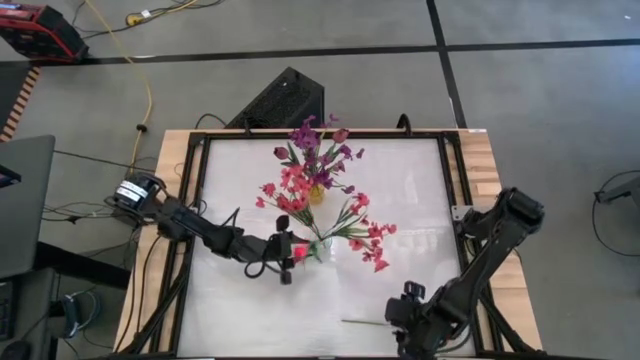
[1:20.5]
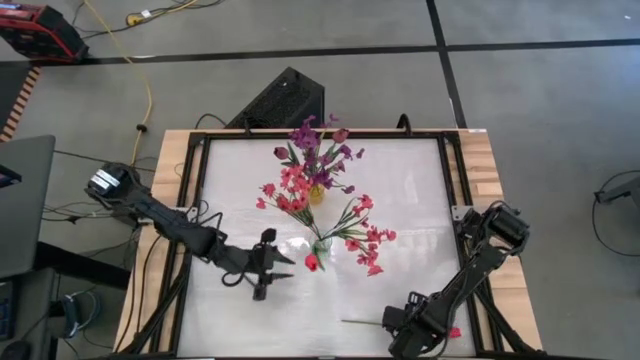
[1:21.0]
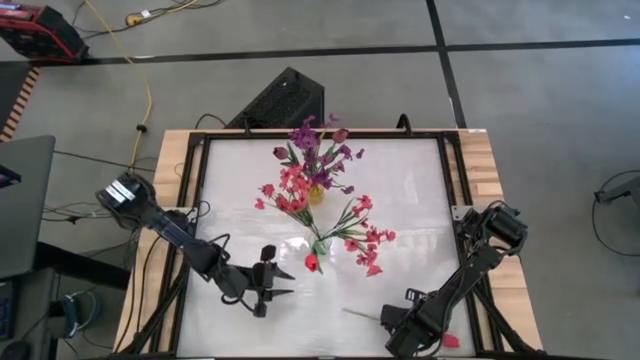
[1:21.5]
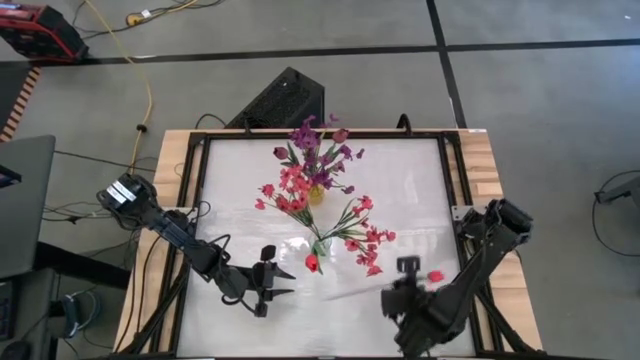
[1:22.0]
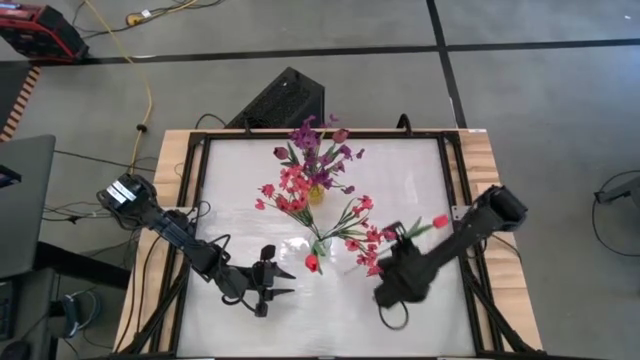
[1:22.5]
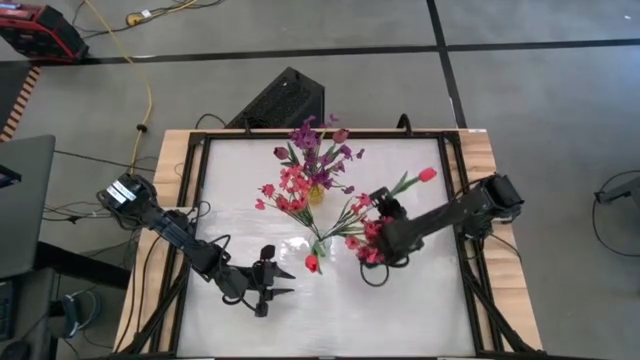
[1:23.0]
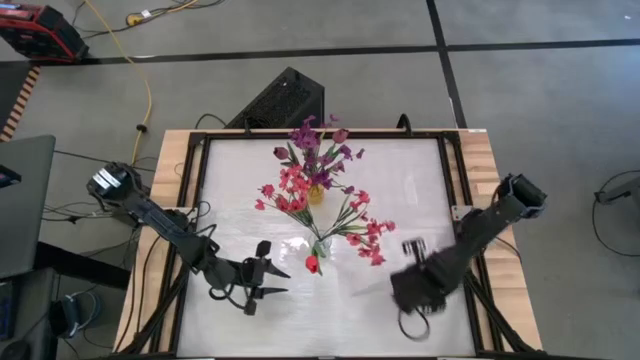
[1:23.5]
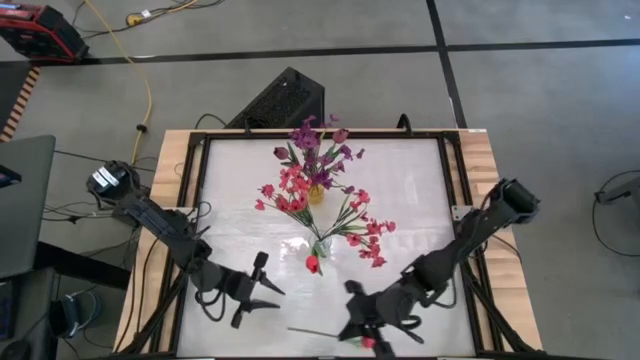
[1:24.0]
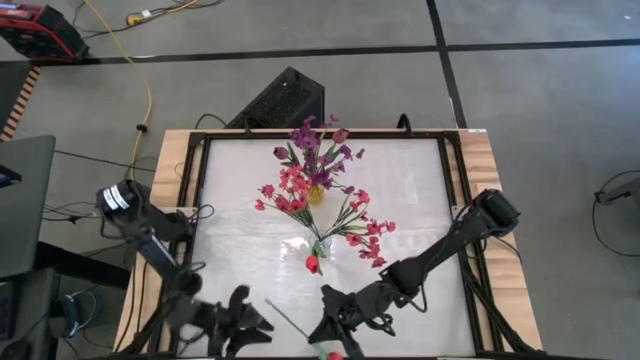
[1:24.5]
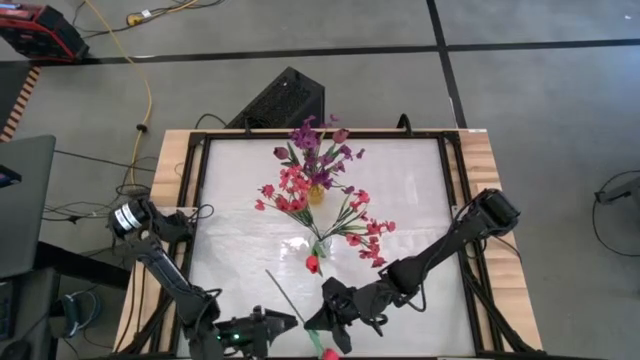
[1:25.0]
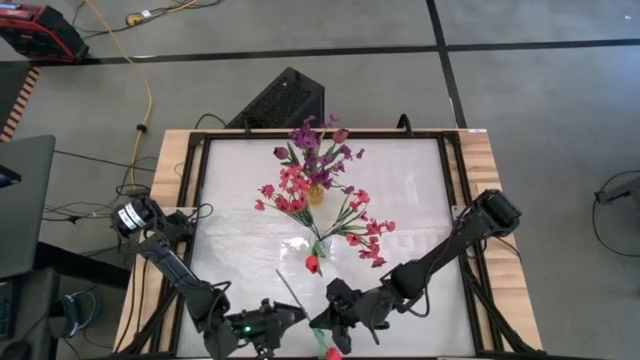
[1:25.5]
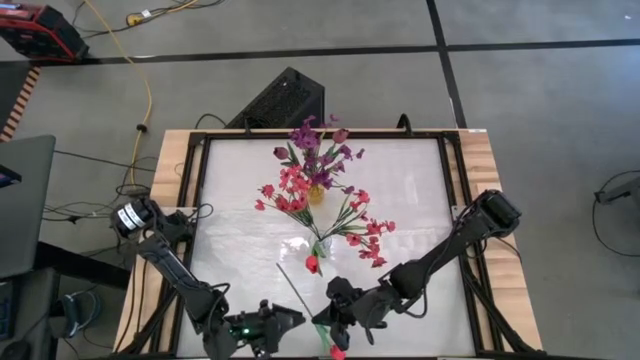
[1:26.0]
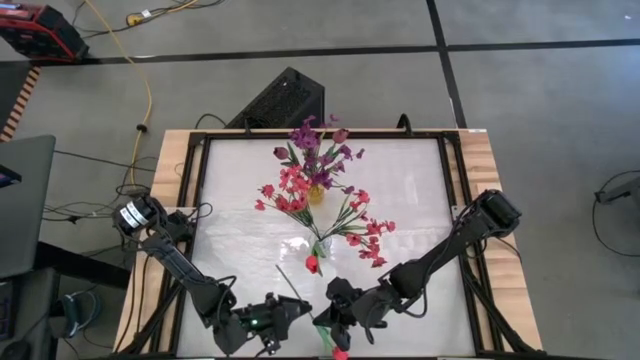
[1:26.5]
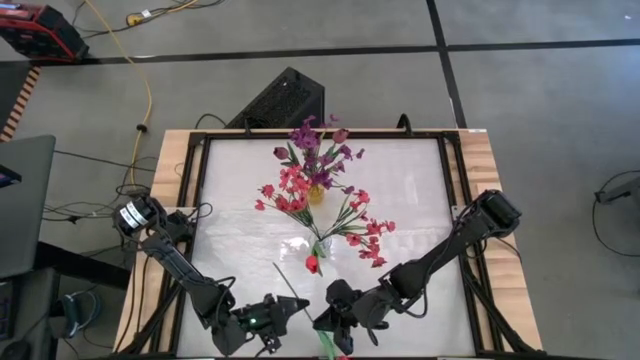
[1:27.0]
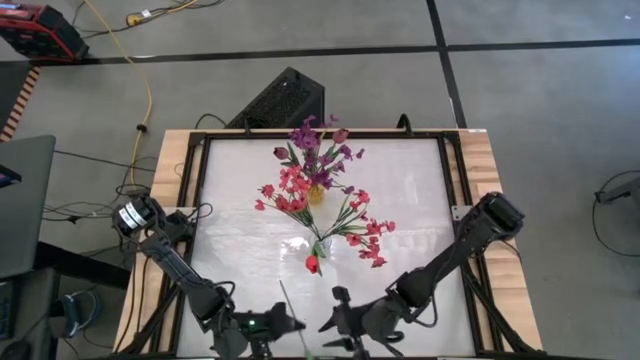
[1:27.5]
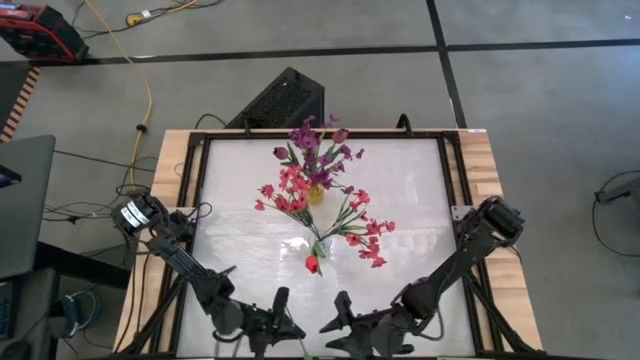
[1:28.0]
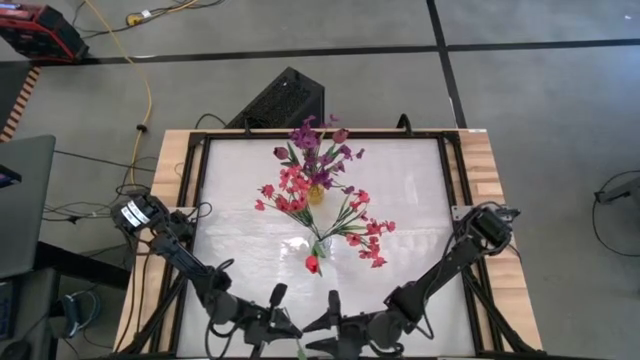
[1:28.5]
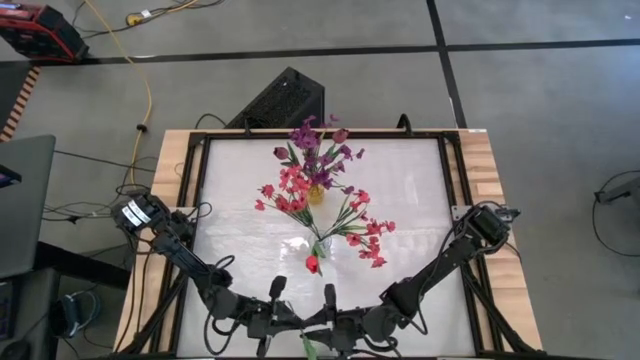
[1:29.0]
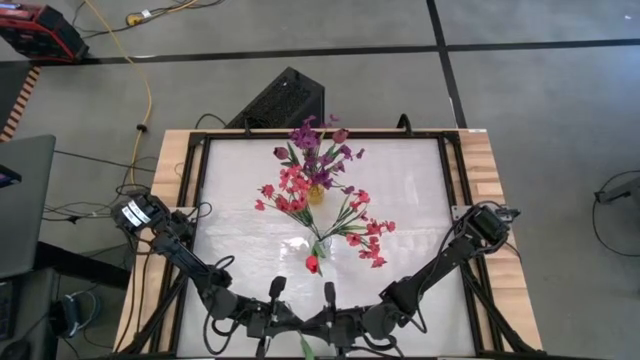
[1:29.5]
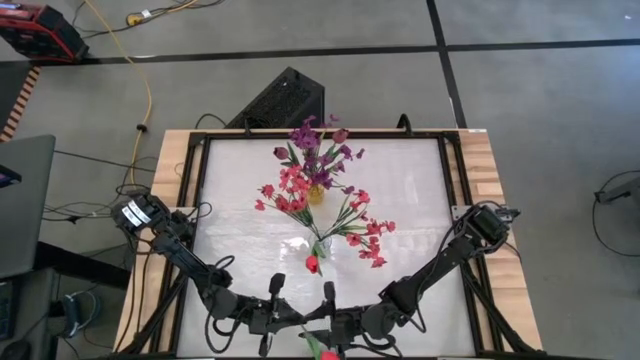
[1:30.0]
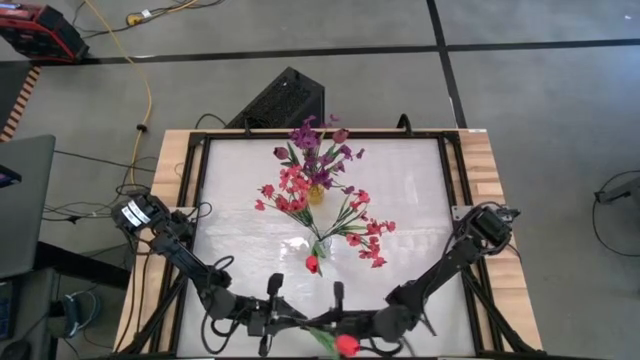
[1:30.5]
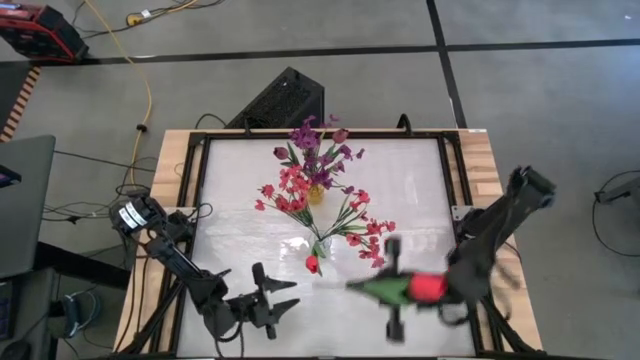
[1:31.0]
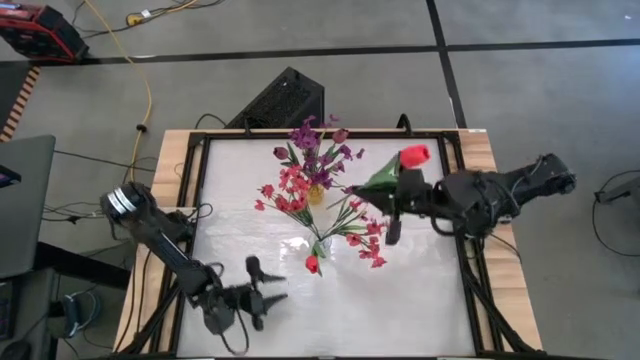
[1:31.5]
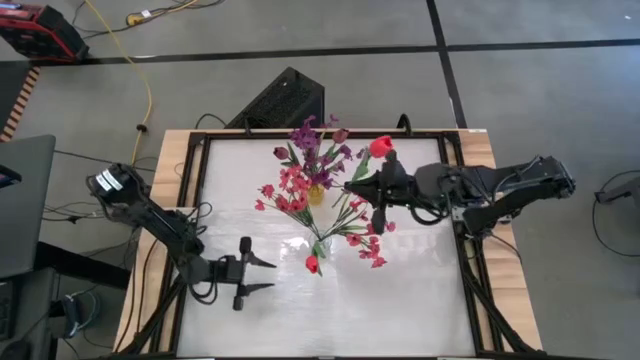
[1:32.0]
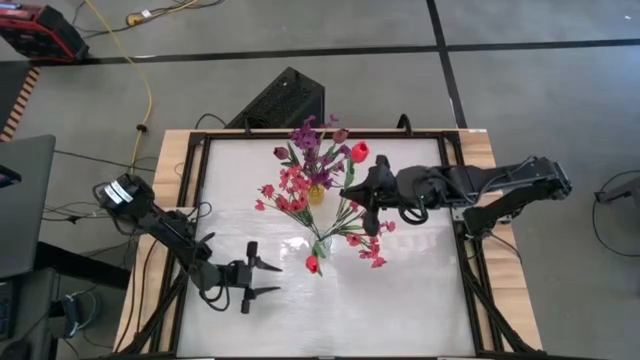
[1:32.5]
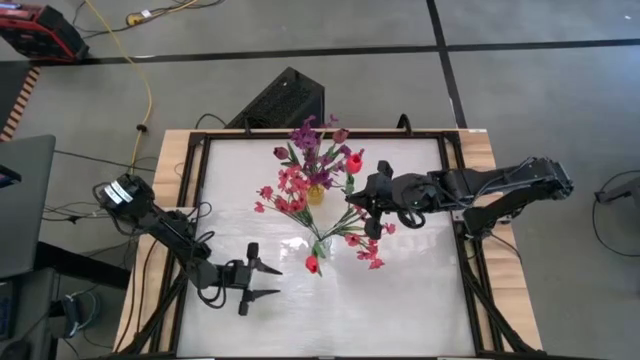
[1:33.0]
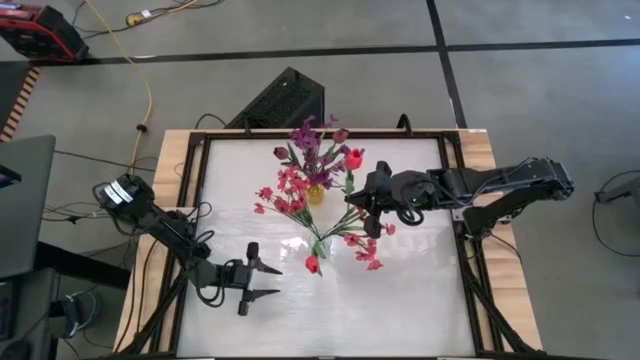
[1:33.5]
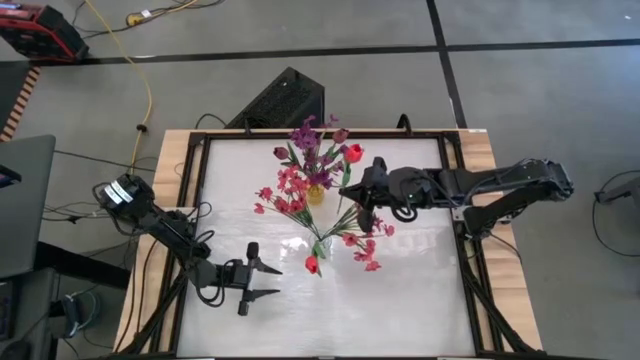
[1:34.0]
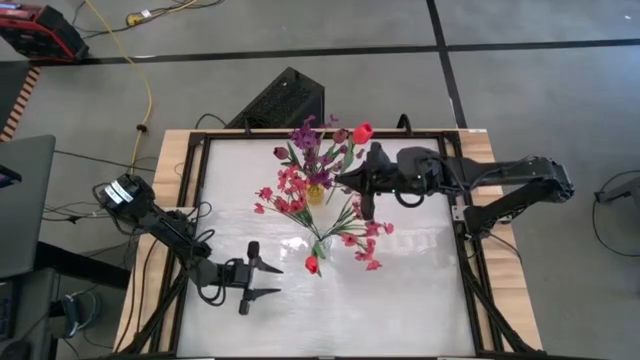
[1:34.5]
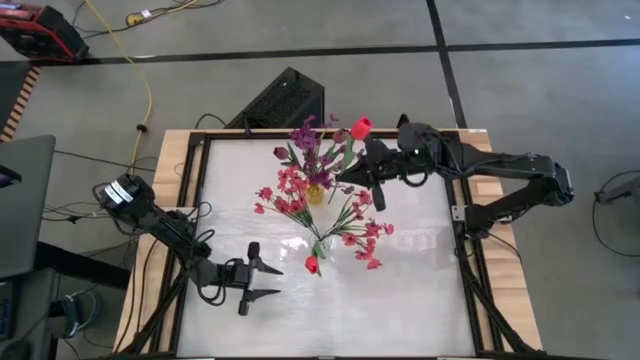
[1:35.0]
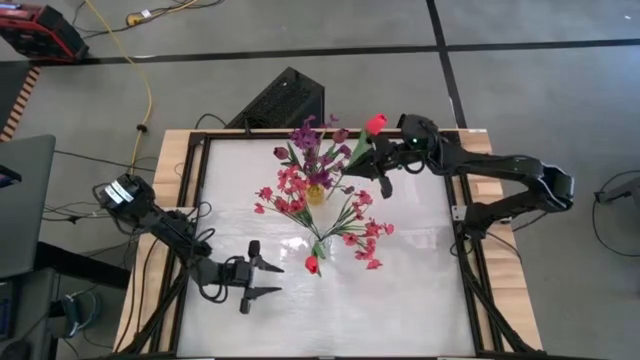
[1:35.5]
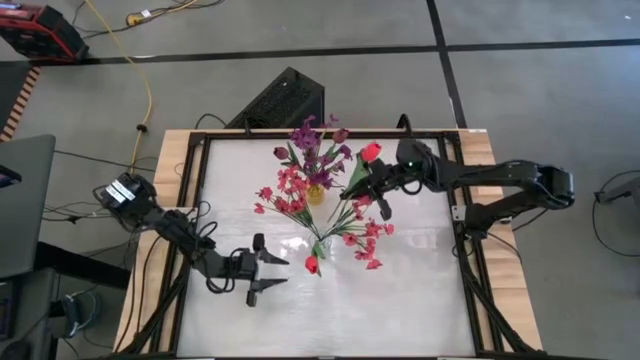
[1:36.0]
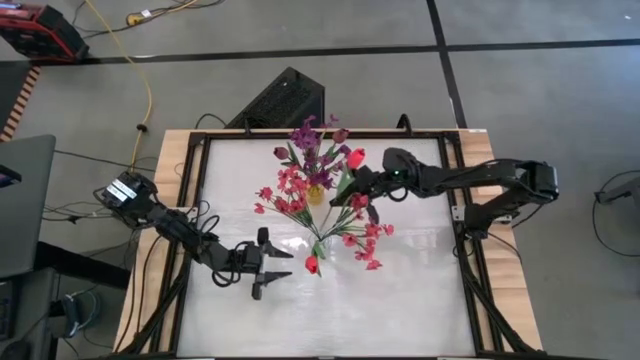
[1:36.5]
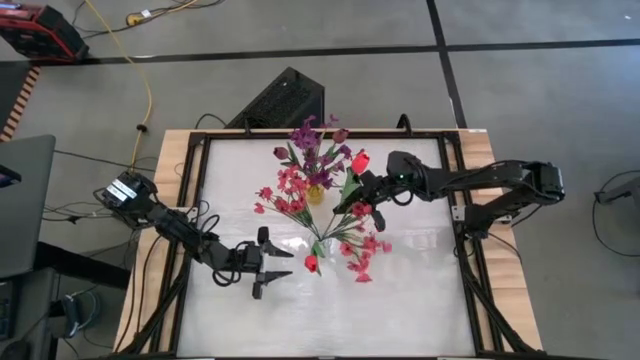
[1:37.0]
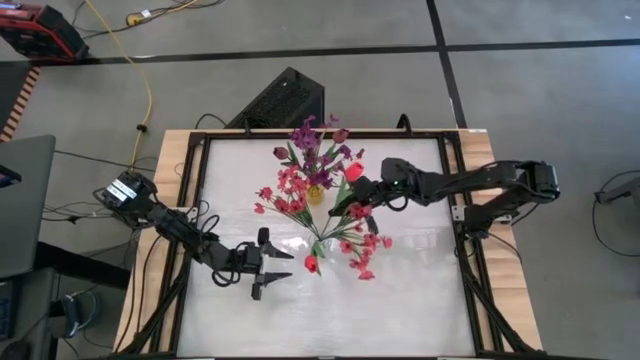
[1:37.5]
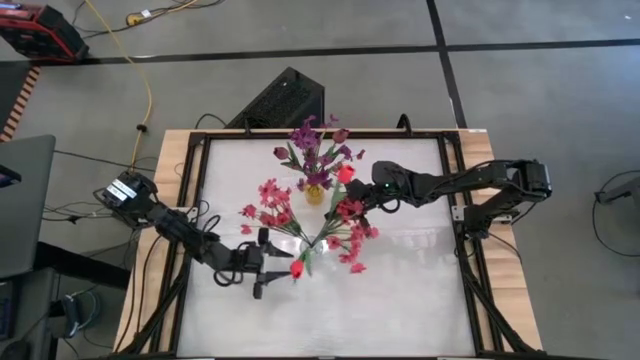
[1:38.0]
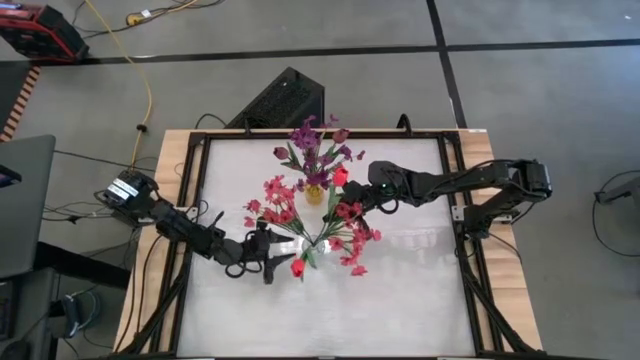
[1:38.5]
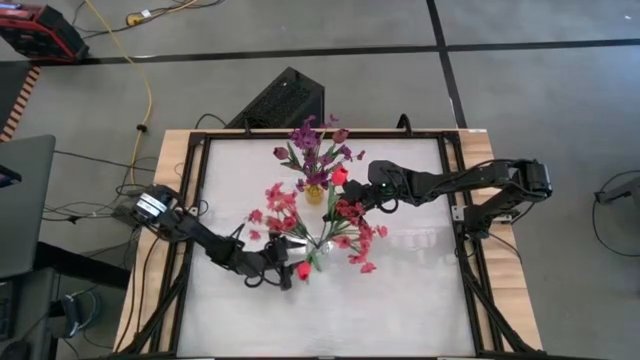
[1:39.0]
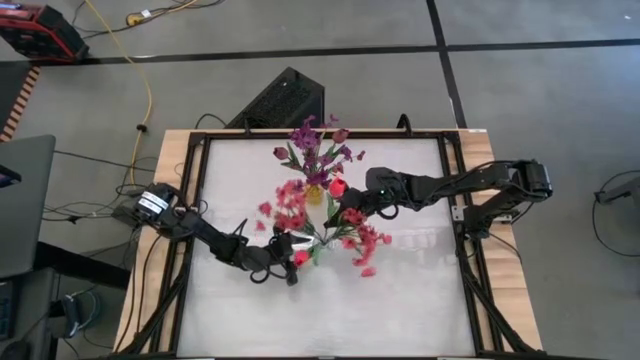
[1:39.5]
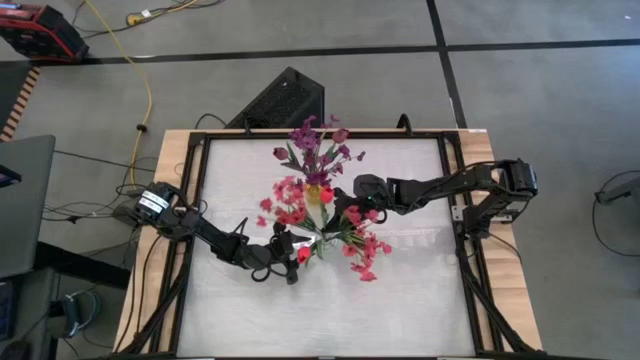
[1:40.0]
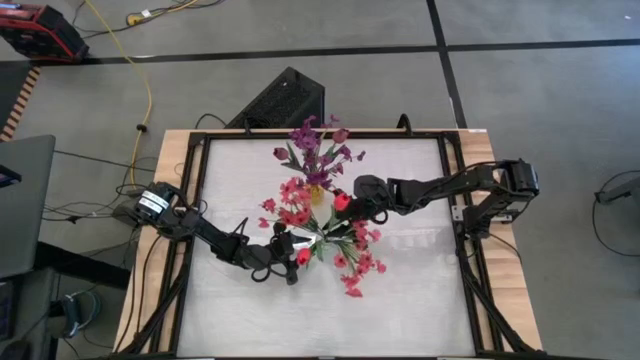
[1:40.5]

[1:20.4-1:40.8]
Task: Sort flowers into vase by color
Put the pink tulip into the transparent vase

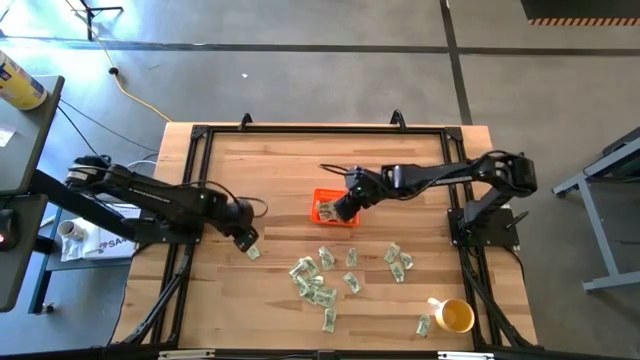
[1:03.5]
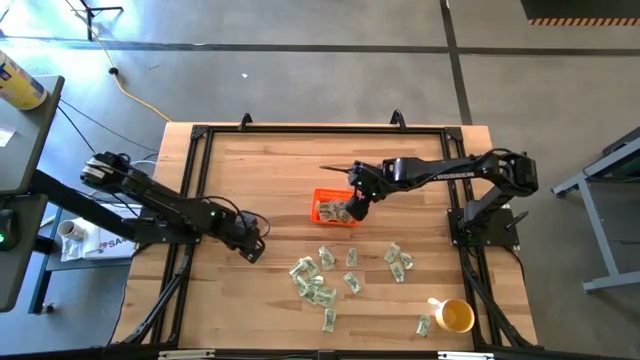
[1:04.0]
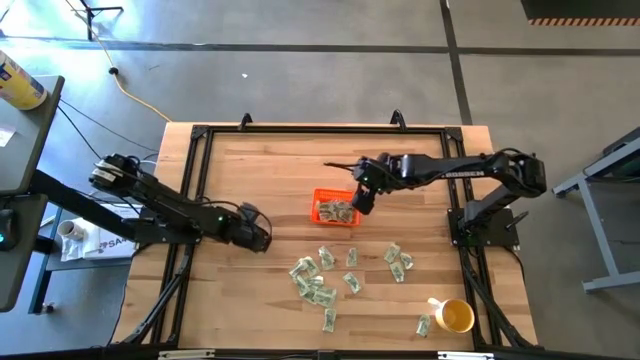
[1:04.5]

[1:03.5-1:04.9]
Task: Pick and place Stevia / Truvia into bins
Put the stevia packet into the orange bin

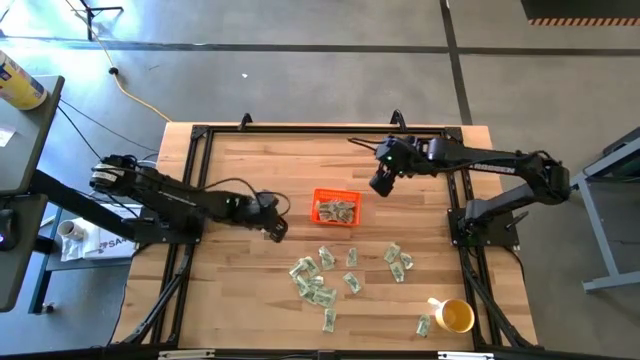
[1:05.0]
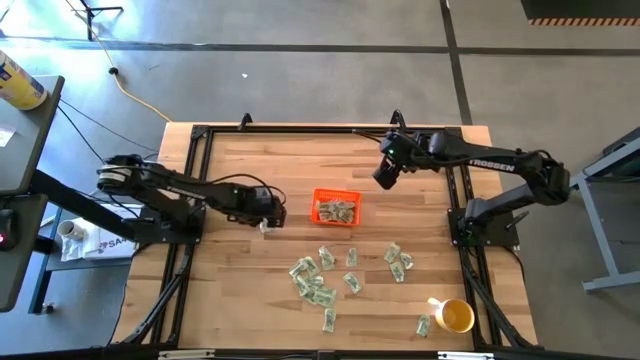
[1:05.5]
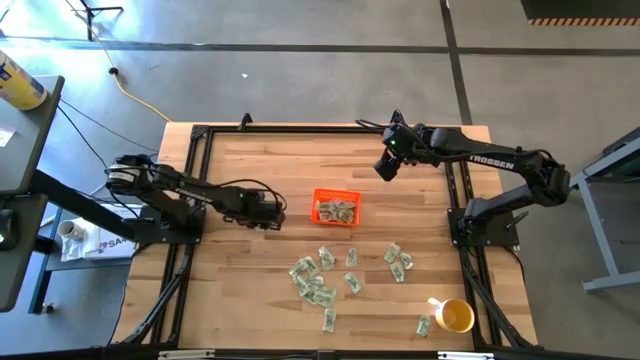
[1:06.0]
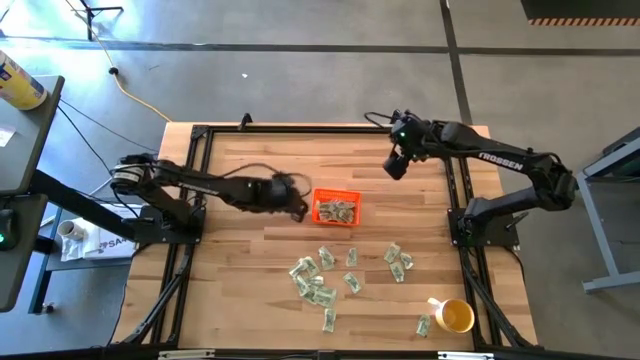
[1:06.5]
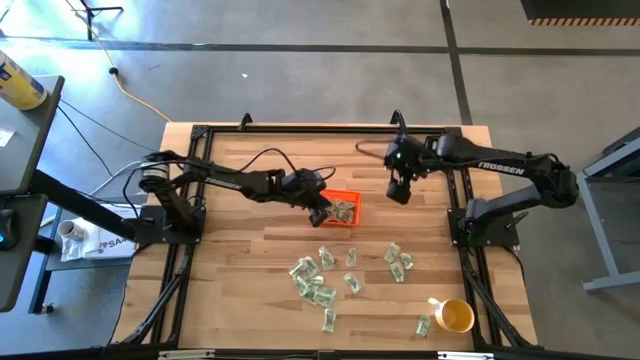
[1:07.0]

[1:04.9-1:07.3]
Put the stevia packet into the orange bin
